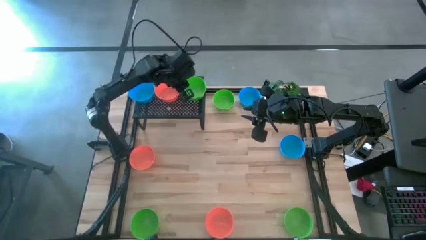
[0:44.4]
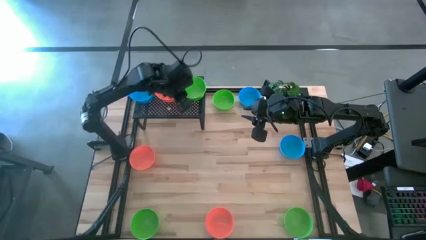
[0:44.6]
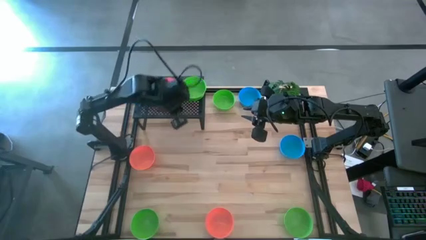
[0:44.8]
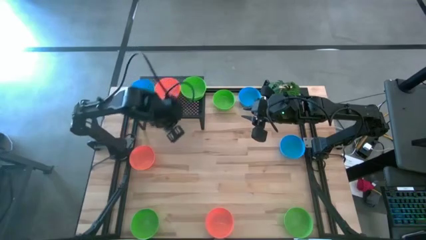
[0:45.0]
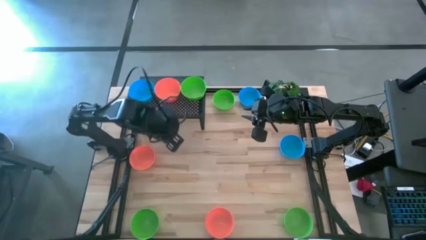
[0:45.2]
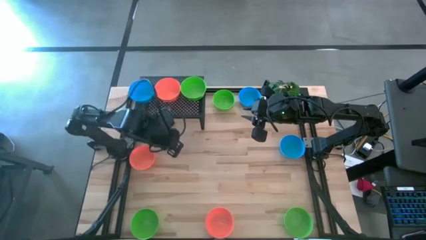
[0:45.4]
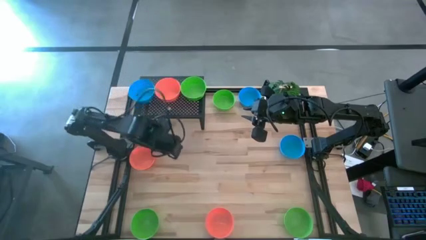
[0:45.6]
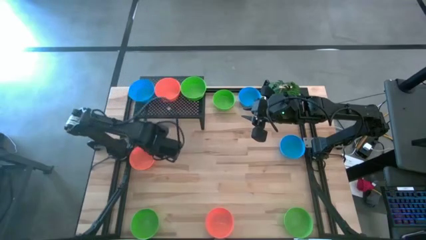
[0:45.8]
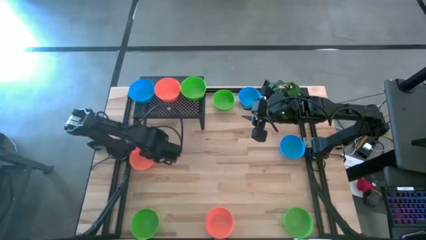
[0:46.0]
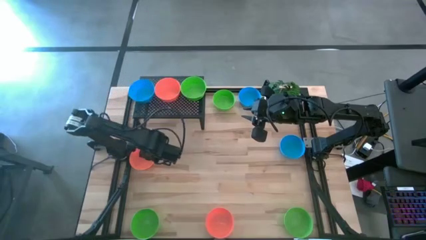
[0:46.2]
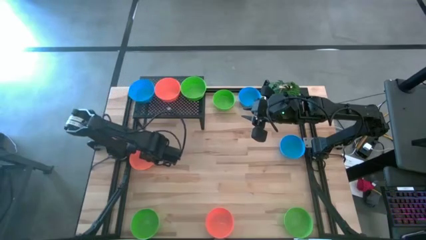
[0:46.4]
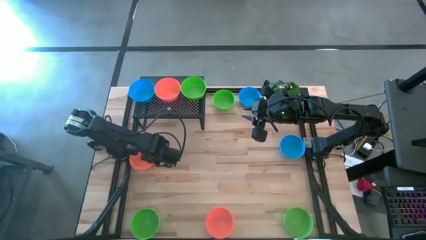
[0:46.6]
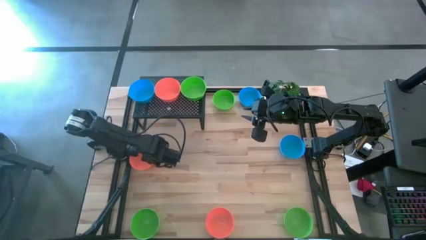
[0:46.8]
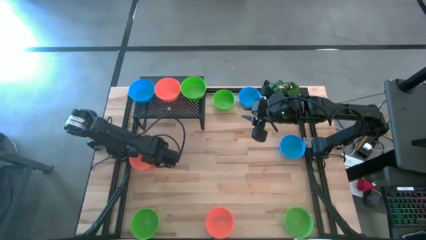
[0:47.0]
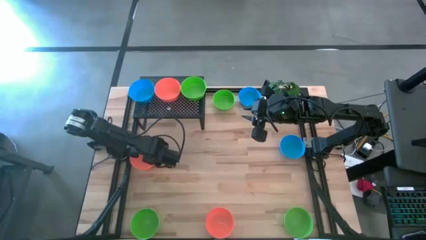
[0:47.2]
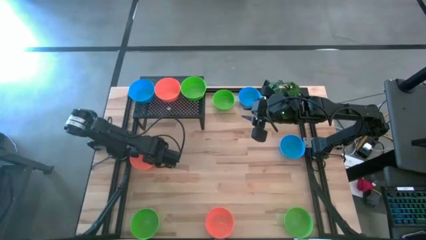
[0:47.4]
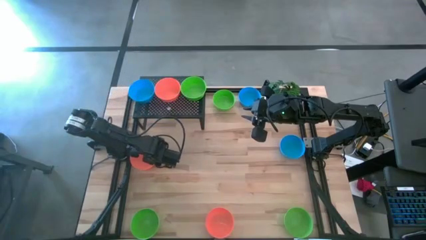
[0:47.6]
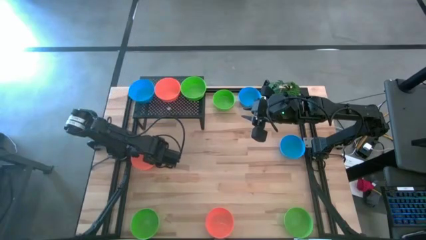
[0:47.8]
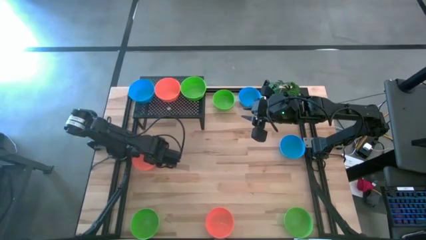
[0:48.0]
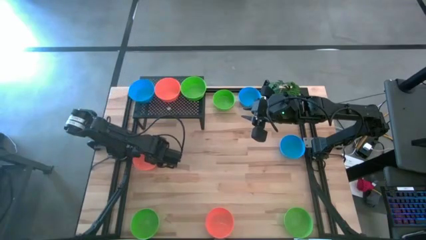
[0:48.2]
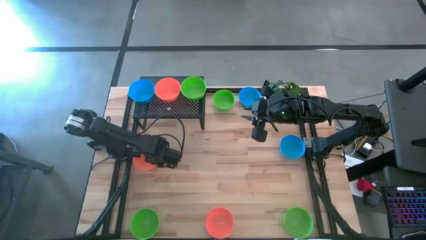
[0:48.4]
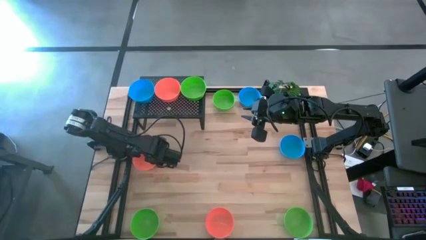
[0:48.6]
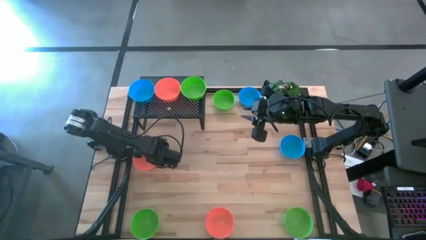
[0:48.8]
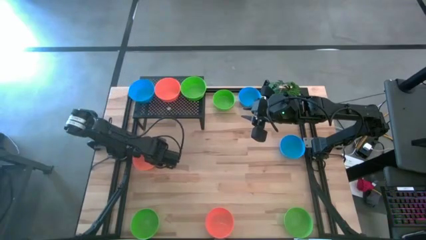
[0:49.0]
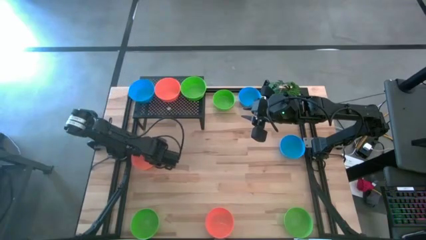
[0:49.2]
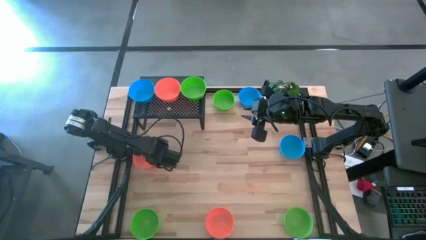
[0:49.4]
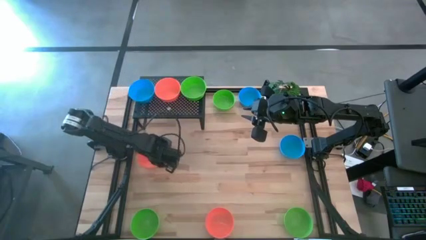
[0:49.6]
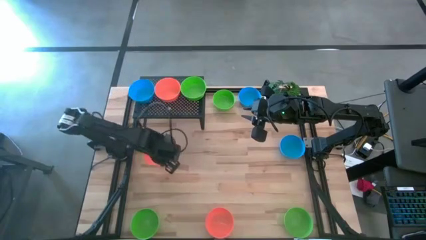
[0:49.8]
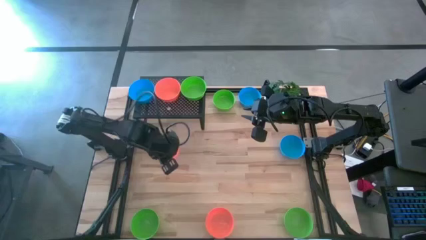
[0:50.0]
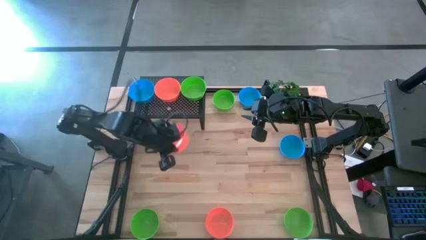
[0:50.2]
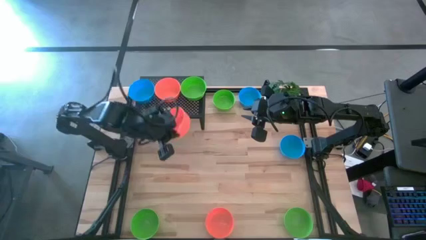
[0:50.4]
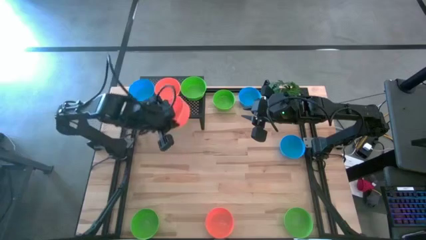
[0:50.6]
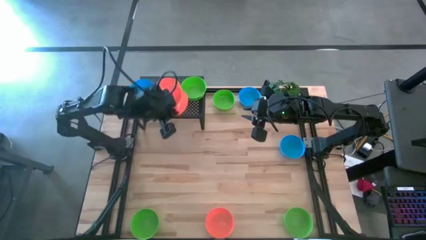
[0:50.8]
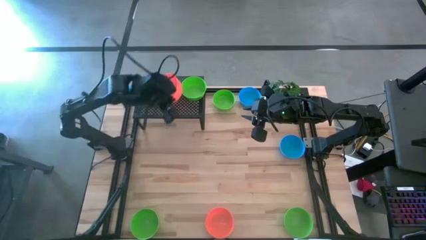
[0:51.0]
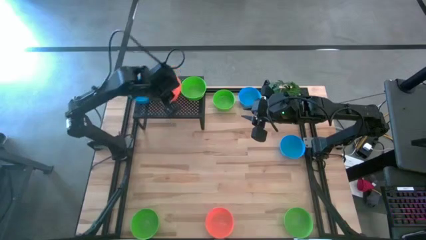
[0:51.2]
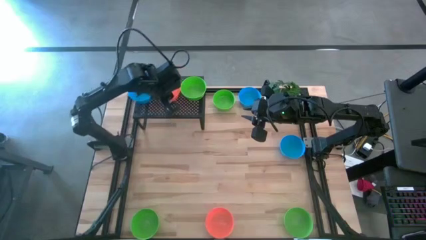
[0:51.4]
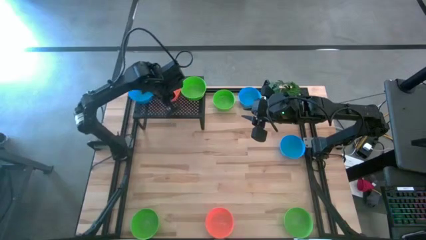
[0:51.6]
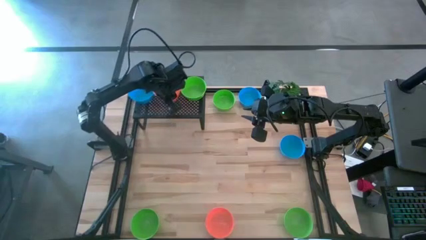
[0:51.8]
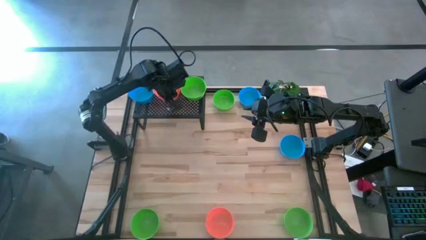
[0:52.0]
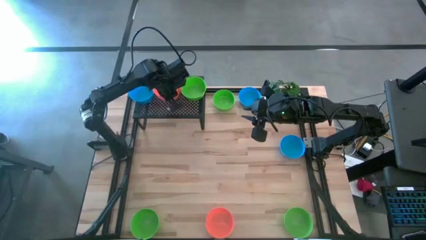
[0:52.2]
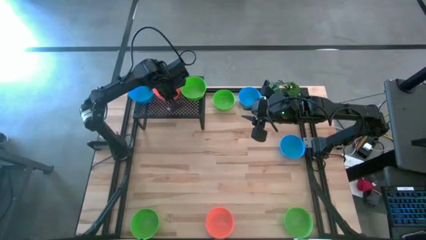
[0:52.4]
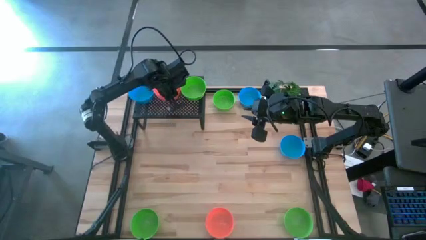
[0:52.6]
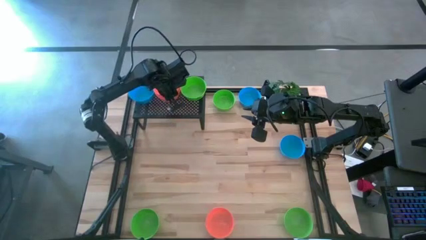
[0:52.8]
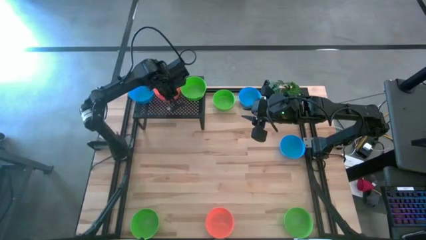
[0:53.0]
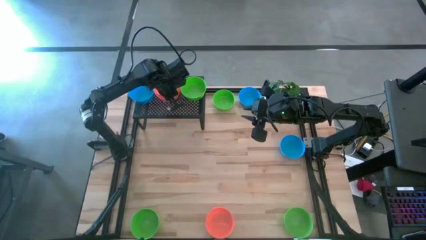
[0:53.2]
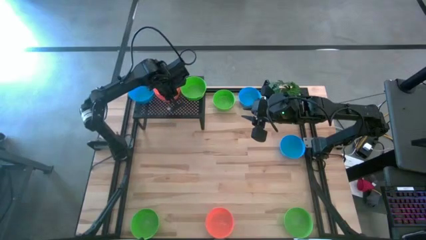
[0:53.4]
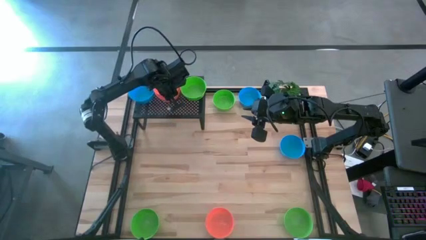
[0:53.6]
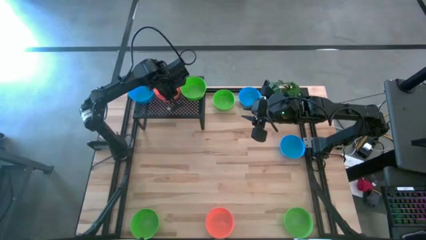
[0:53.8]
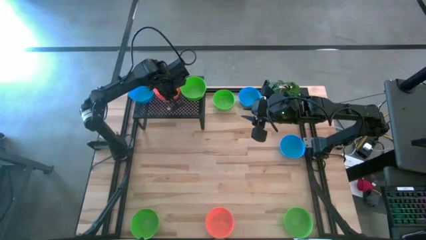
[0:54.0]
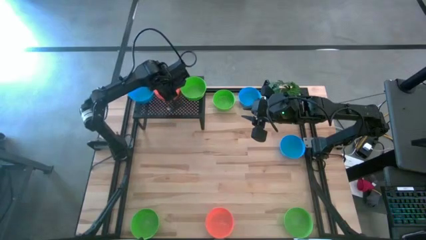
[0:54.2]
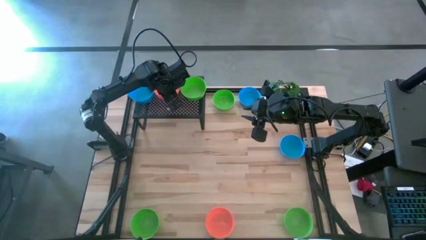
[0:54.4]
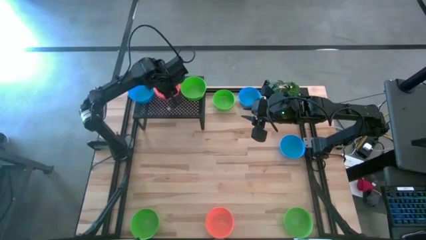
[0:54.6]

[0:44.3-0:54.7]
Task: Pick & Place Mini bowls
Stack the orange bowl on top of the orange bowl on the shelf
